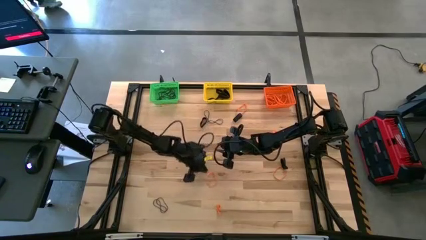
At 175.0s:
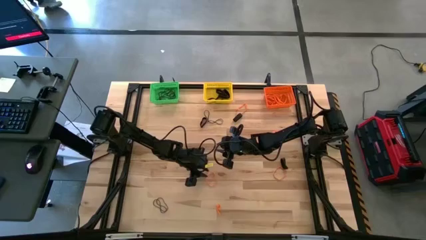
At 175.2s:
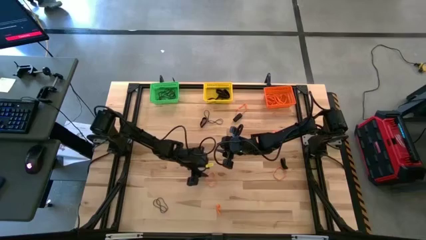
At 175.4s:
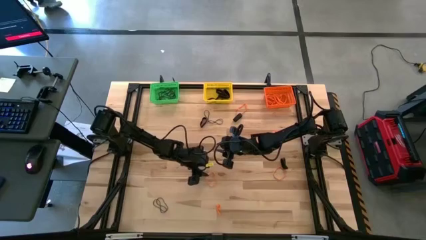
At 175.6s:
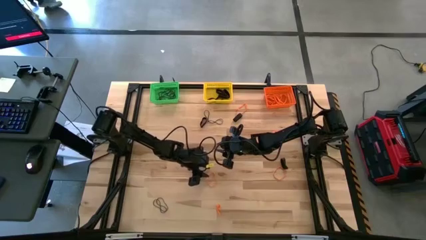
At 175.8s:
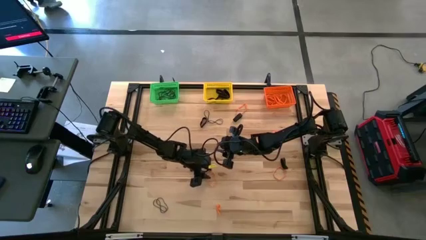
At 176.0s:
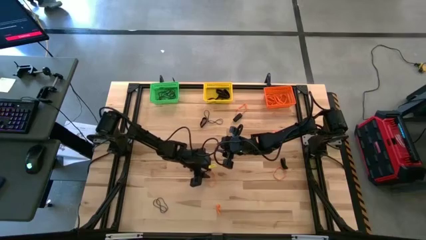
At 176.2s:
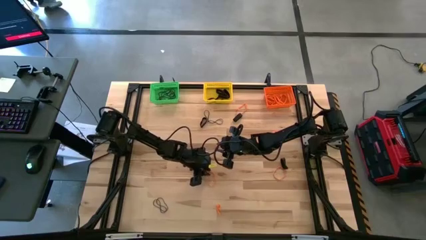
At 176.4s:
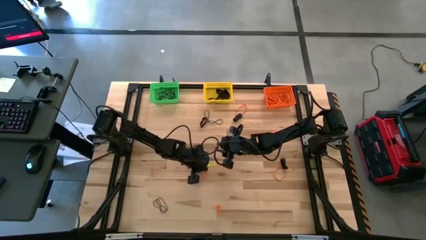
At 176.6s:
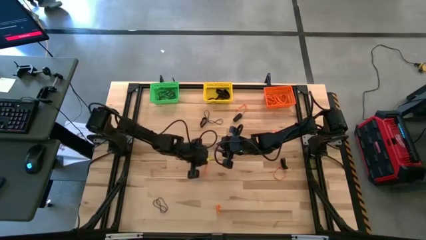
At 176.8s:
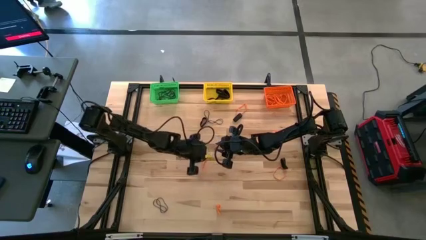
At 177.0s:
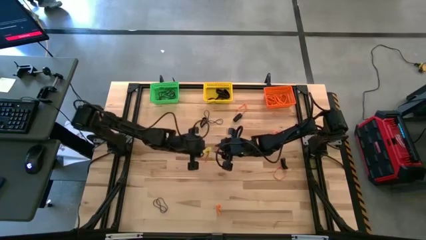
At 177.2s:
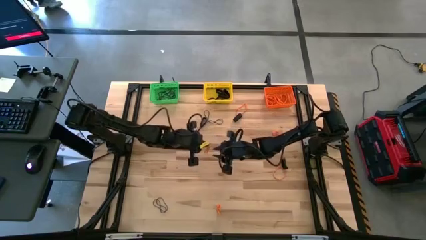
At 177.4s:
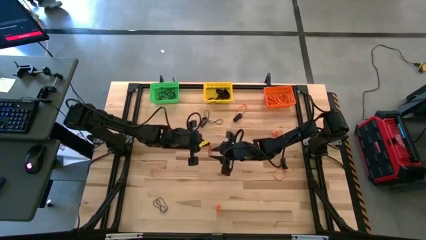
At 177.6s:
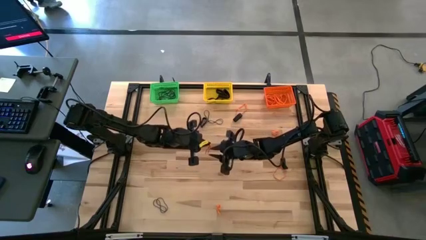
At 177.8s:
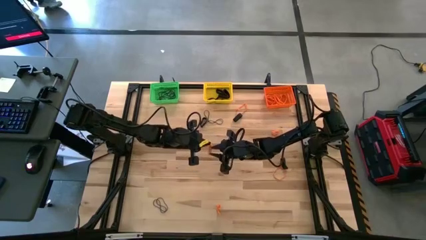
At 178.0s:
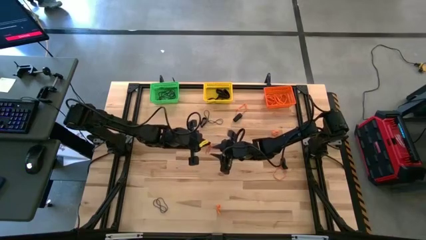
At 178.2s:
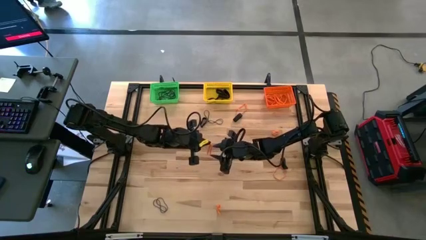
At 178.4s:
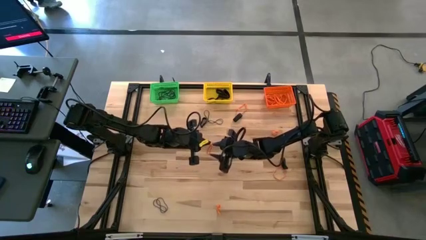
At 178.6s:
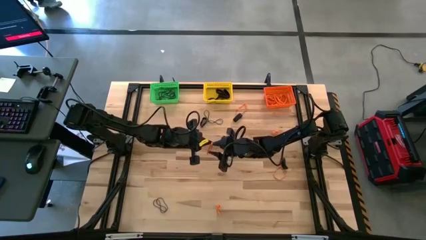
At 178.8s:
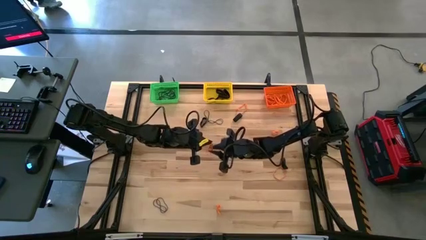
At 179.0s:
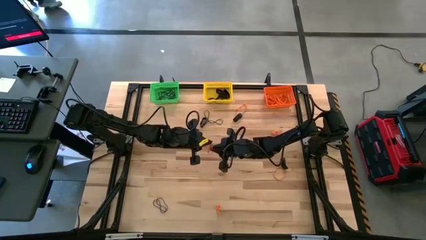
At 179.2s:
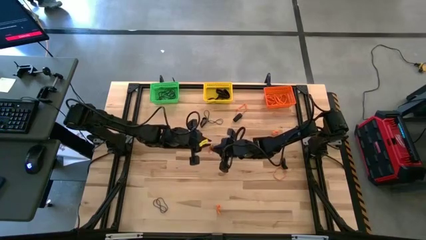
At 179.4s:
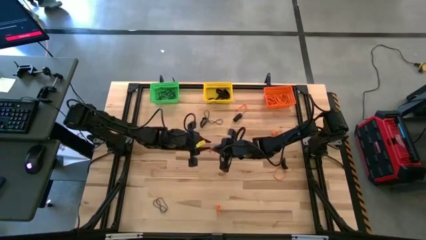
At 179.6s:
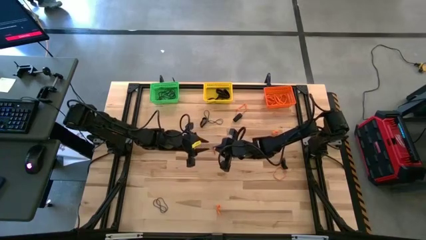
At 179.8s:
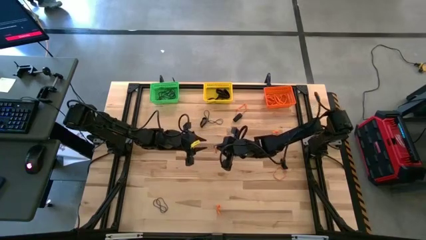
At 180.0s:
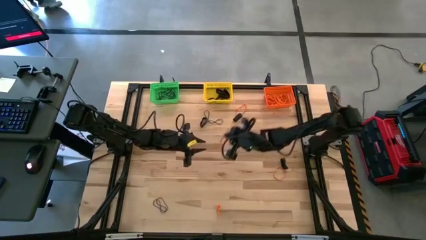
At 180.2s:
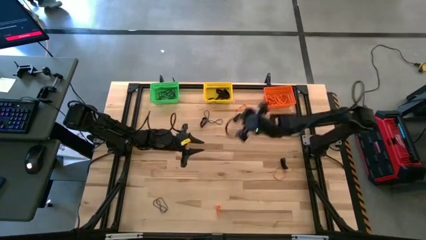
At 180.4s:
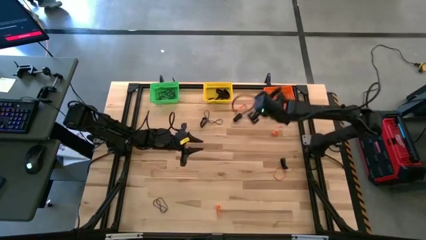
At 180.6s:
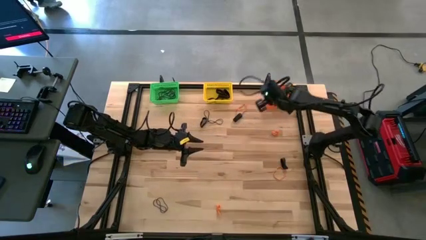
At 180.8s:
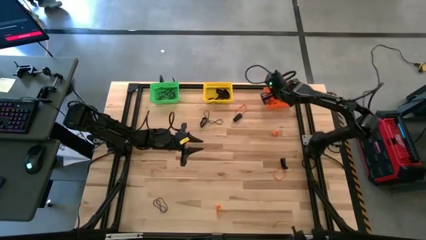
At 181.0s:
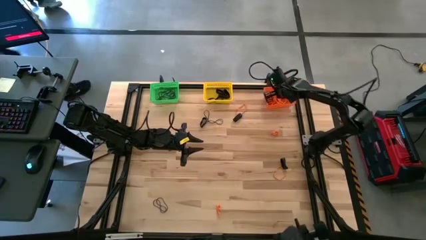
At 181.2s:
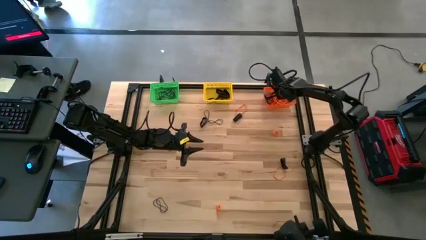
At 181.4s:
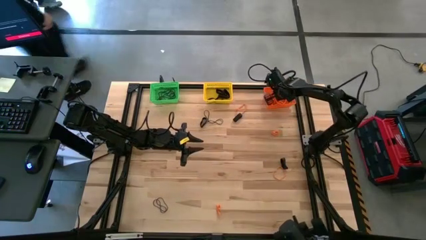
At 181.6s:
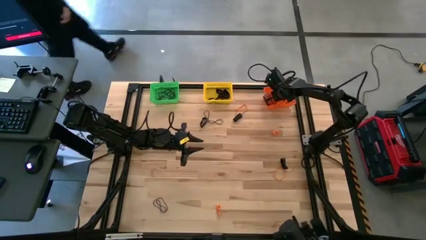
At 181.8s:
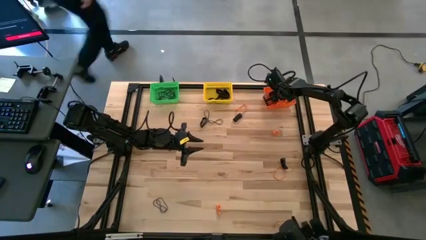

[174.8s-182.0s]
Task: Sort rubber bands into baskets
Put the orange rubber band into the orange bin

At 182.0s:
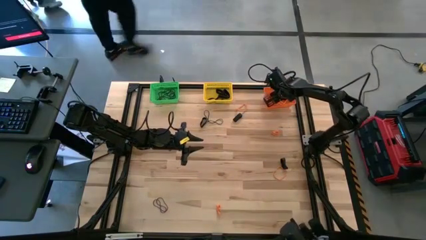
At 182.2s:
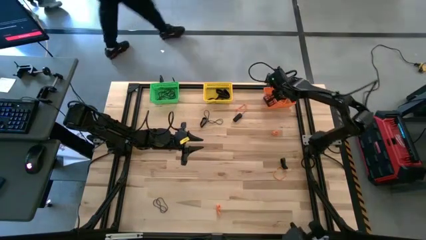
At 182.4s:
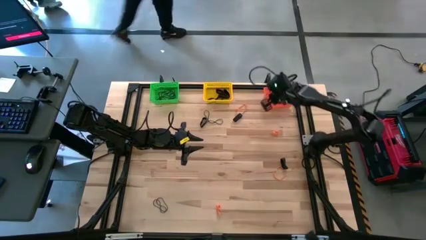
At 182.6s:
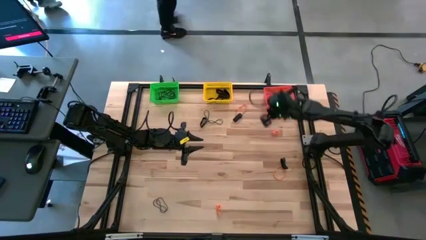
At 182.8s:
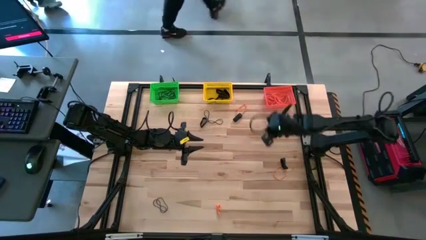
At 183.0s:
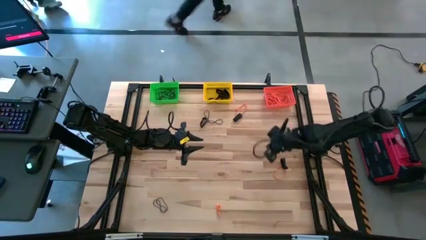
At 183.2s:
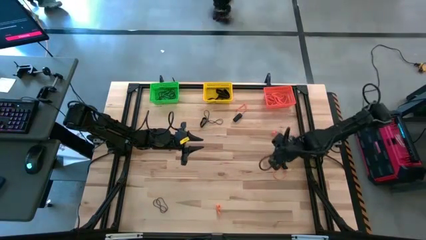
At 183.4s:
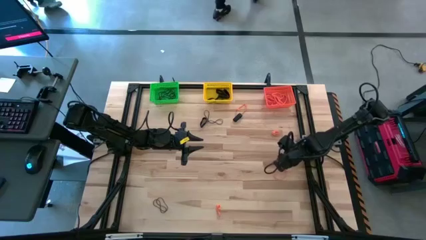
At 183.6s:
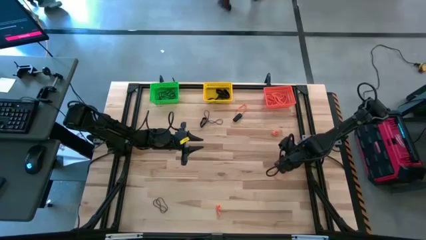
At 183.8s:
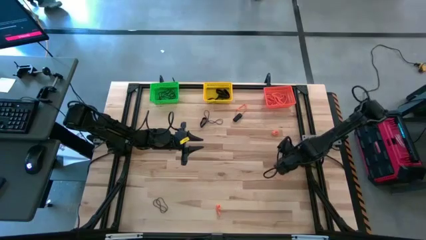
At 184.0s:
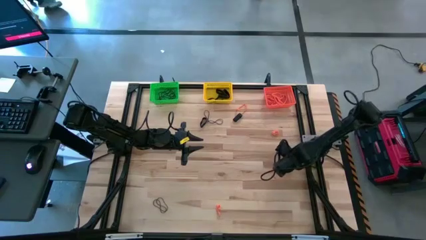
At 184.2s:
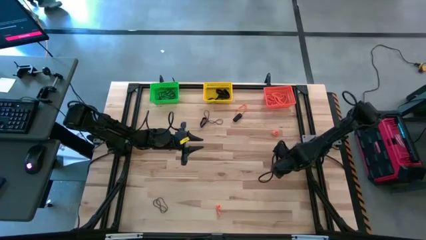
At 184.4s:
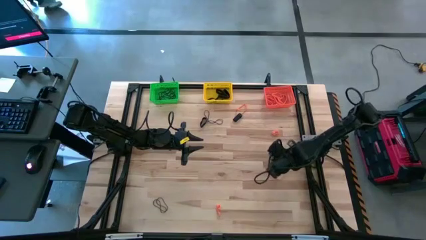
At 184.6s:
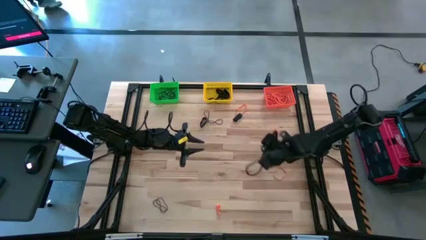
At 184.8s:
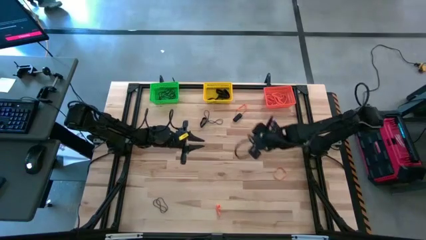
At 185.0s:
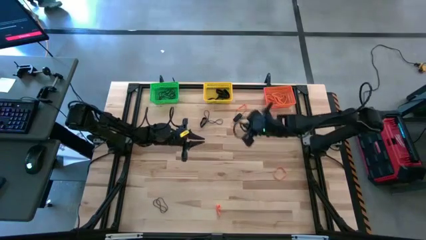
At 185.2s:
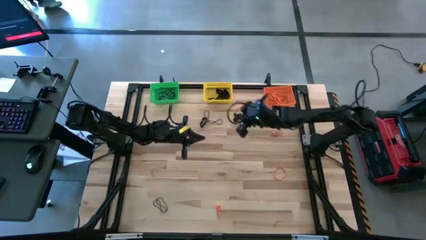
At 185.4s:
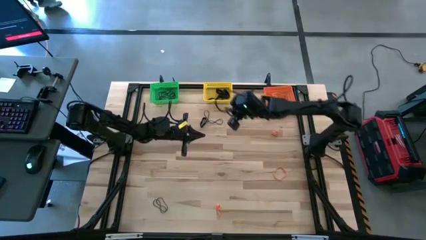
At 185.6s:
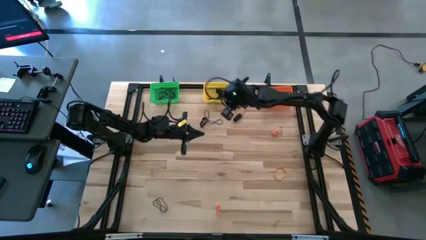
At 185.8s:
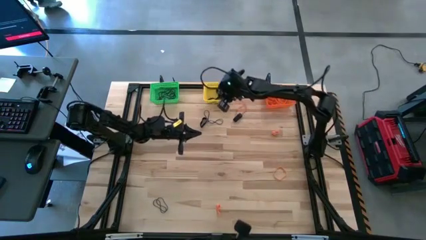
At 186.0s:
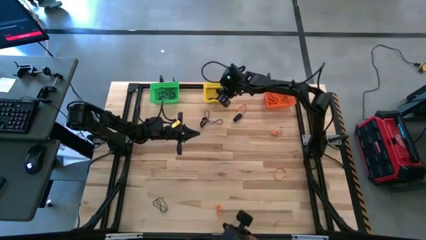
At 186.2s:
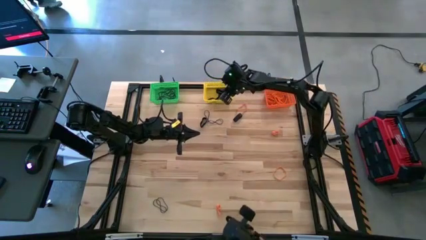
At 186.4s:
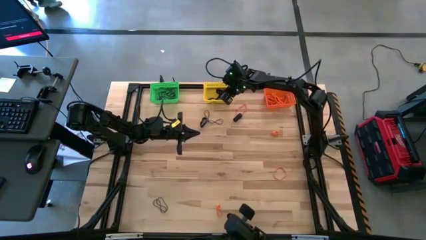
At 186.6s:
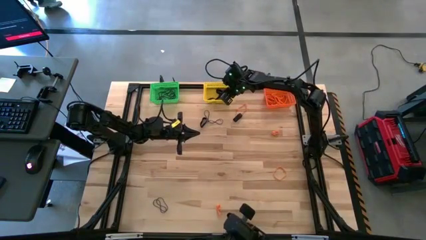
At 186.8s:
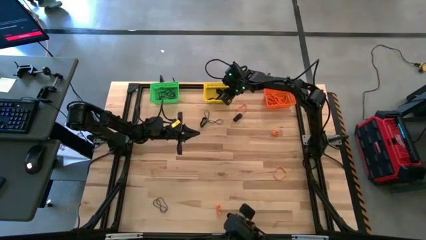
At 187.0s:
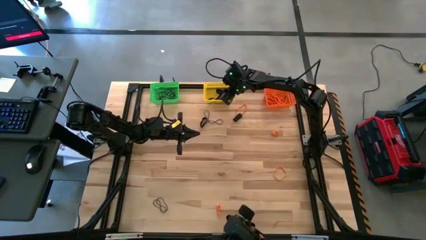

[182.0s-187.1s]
Put the black rubber band into the yellow bin

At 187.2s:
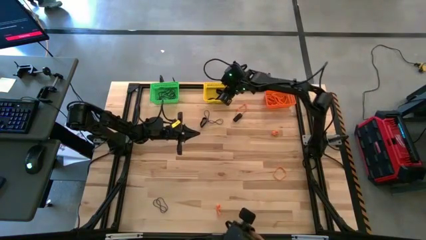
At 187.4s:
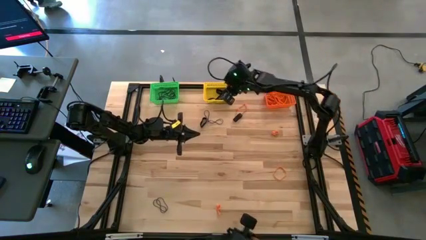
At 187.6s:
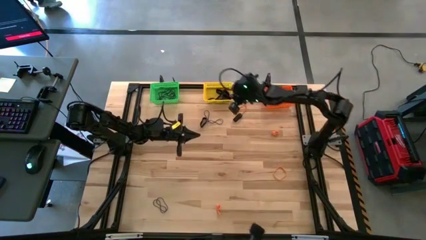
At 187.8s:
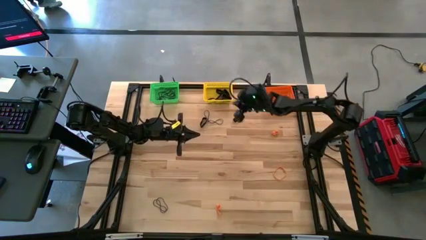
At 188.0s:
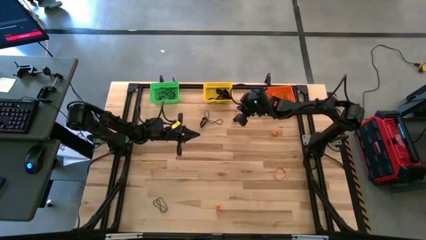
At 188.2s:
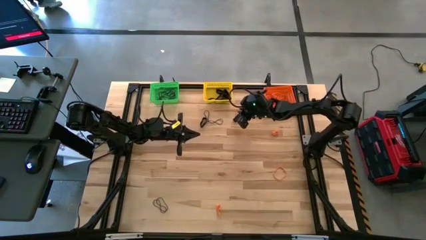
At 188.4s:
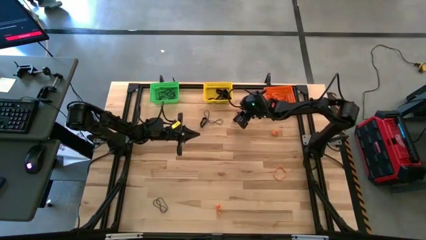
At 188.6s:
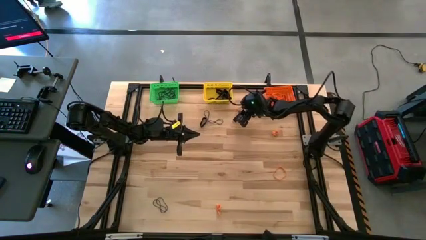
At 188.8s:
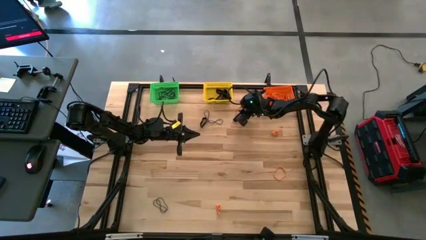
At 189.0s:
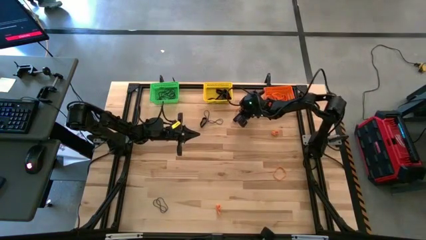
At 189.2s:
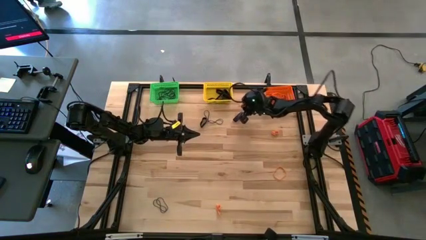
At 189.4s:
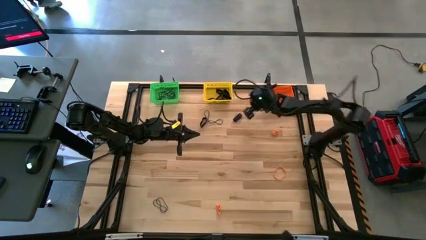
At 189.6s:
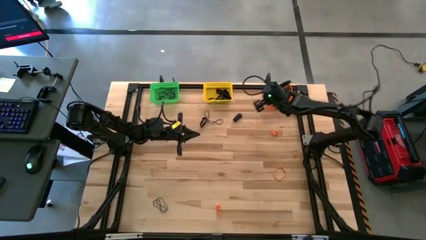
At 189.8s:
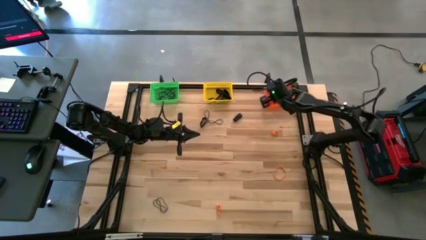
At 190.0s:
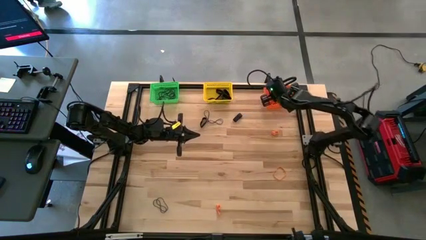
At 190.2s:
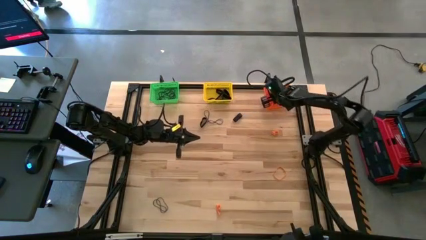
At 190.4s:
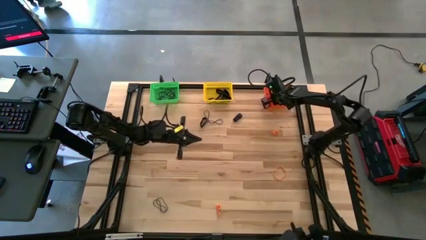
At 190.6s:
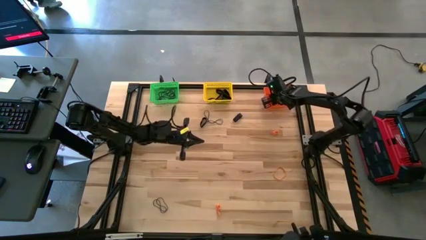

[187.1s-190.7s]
Put the orange rubber band into the orange bin
